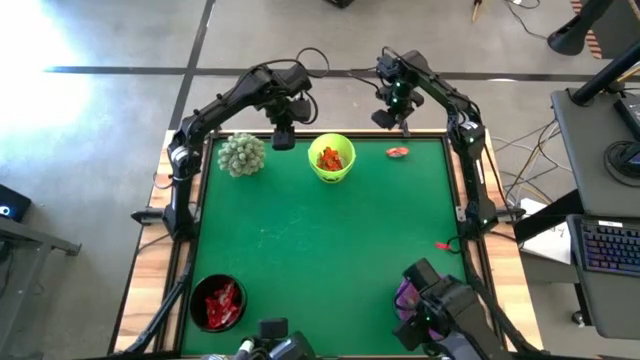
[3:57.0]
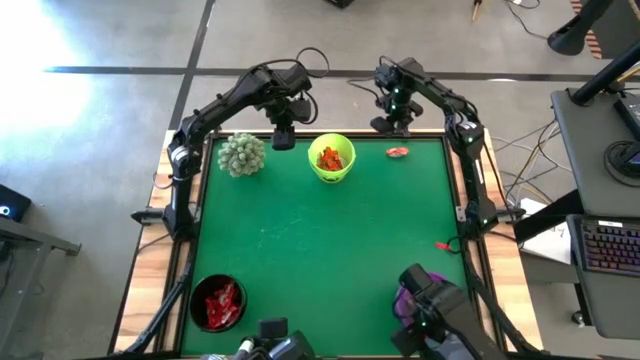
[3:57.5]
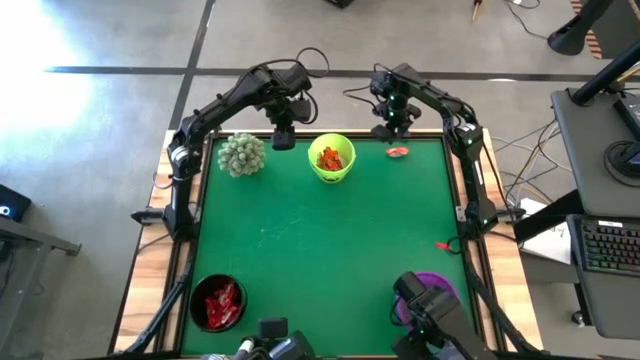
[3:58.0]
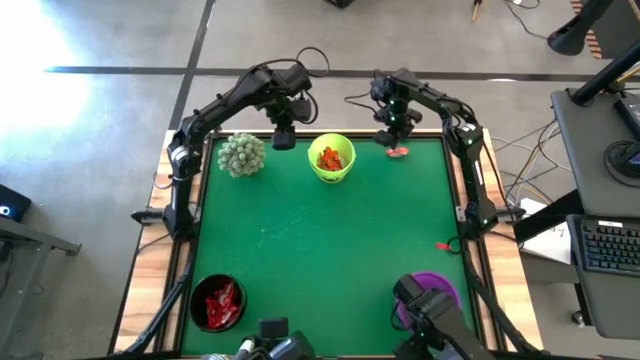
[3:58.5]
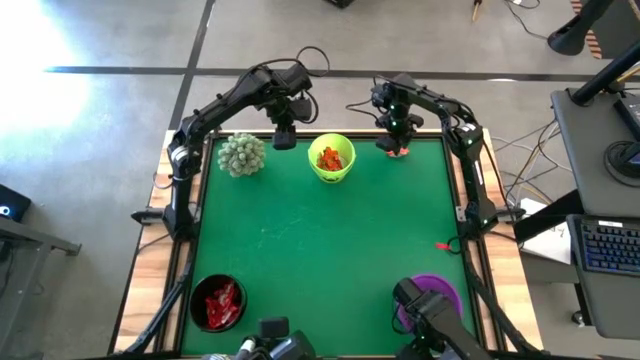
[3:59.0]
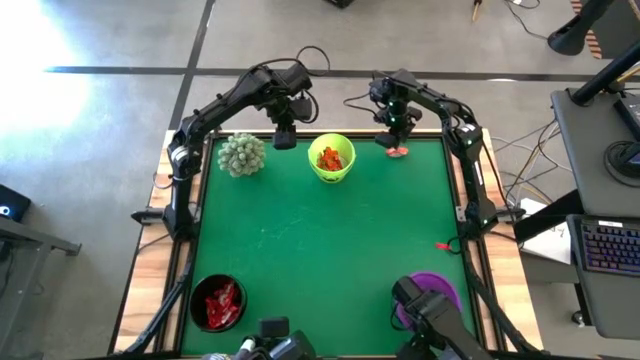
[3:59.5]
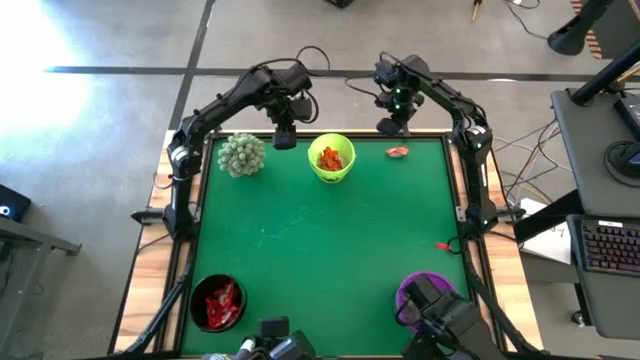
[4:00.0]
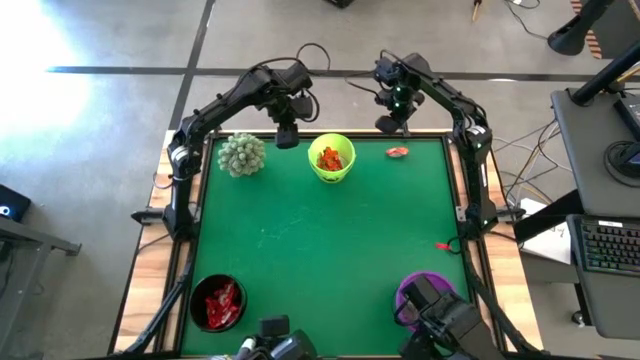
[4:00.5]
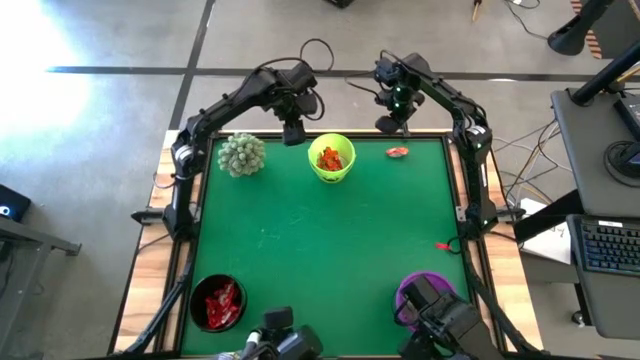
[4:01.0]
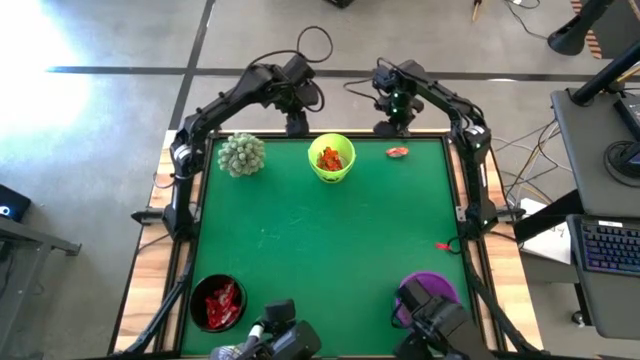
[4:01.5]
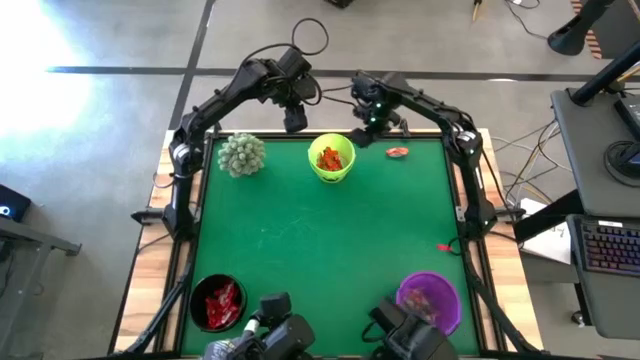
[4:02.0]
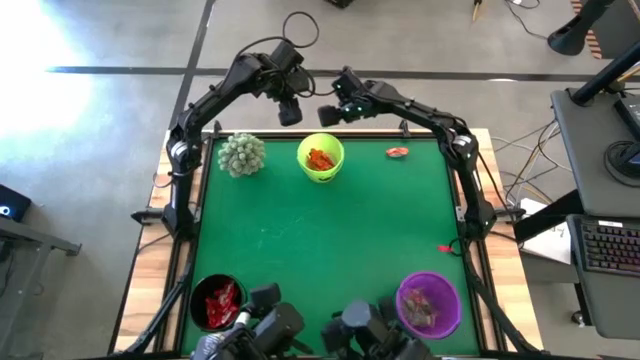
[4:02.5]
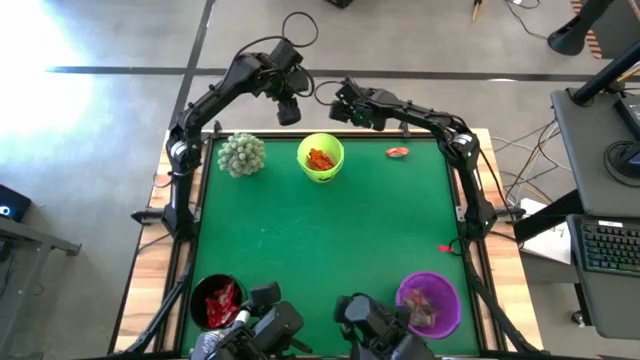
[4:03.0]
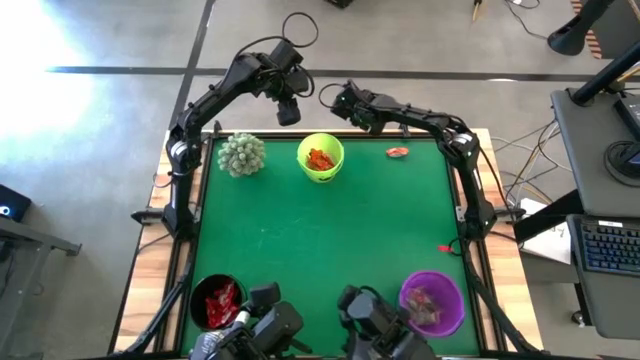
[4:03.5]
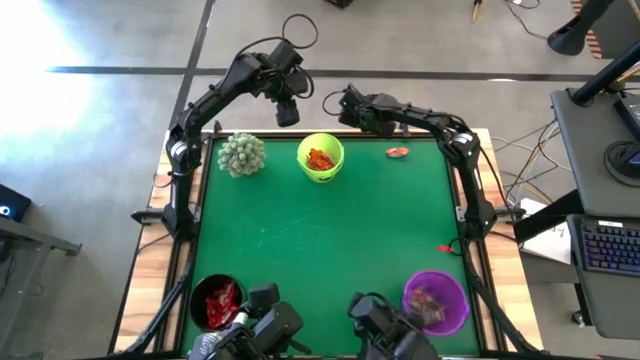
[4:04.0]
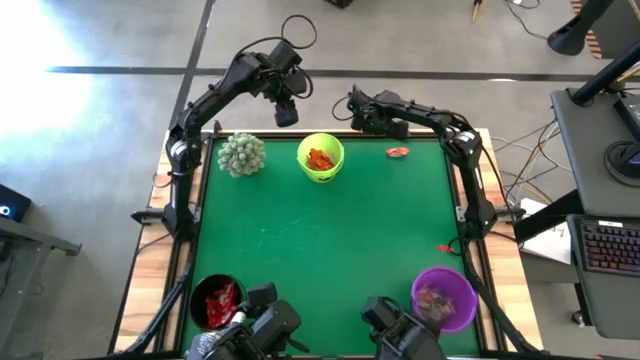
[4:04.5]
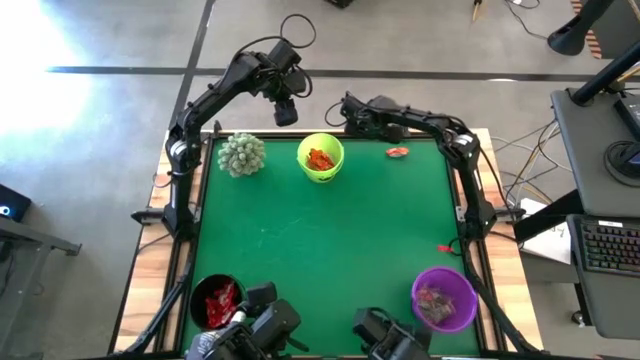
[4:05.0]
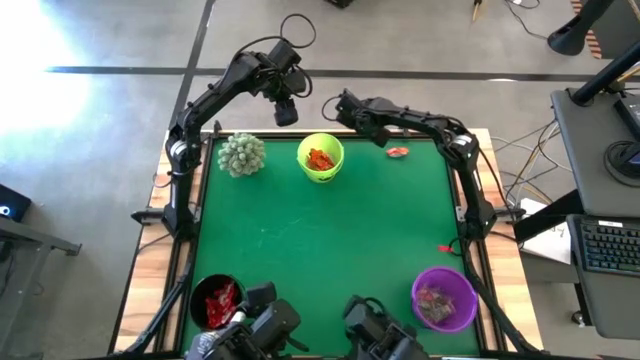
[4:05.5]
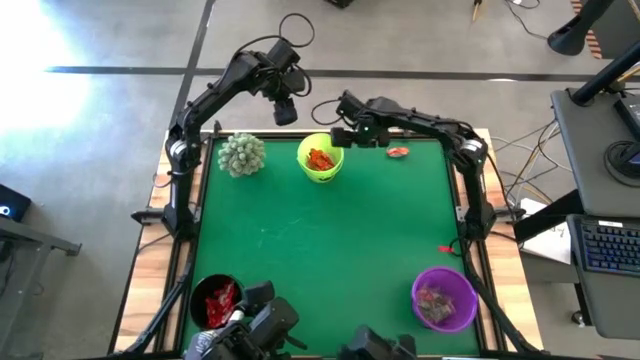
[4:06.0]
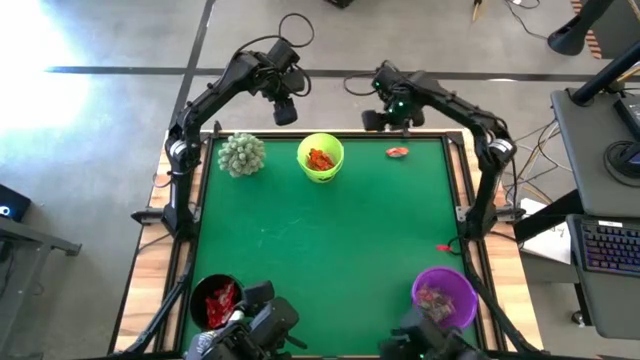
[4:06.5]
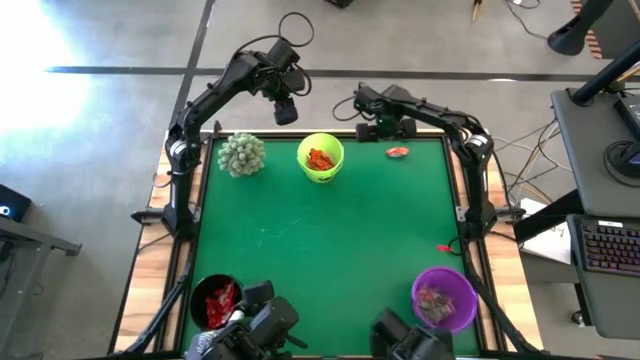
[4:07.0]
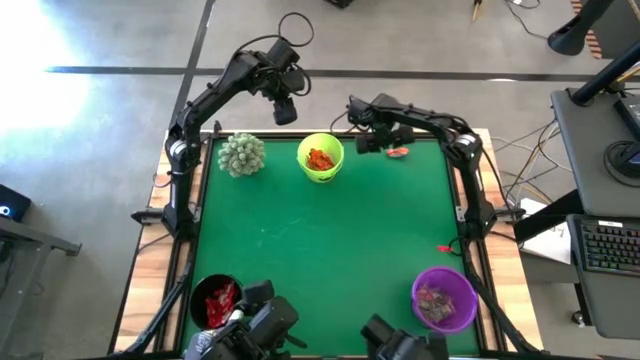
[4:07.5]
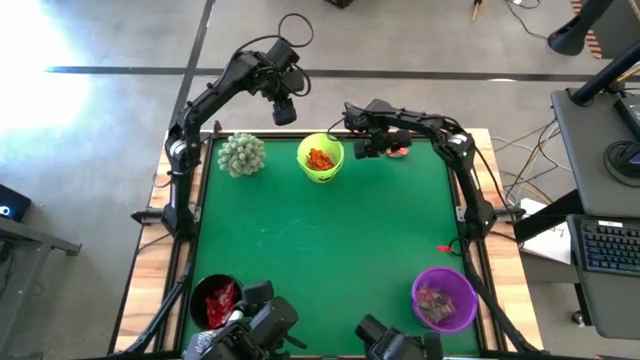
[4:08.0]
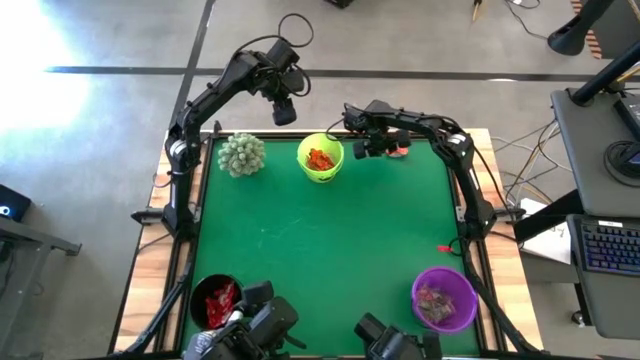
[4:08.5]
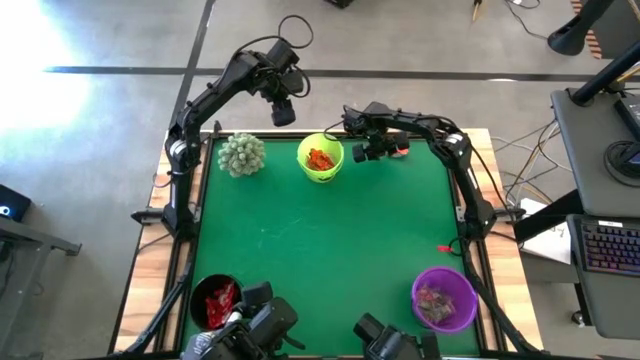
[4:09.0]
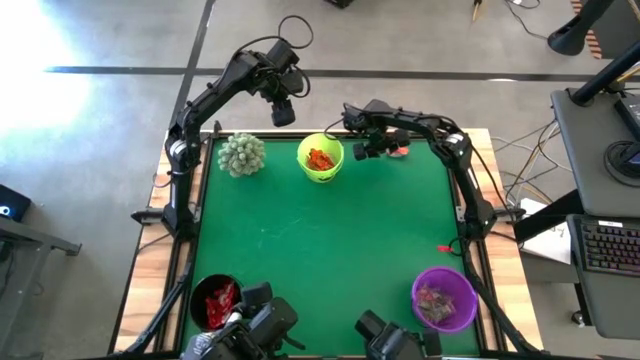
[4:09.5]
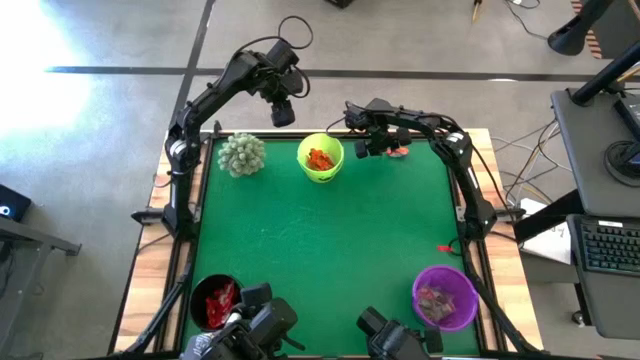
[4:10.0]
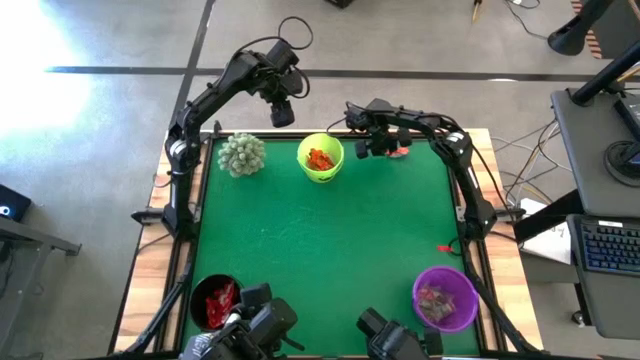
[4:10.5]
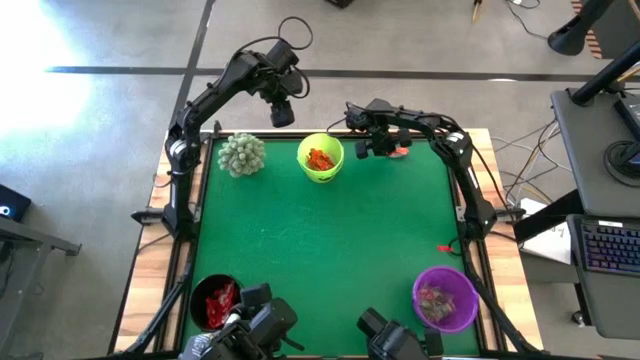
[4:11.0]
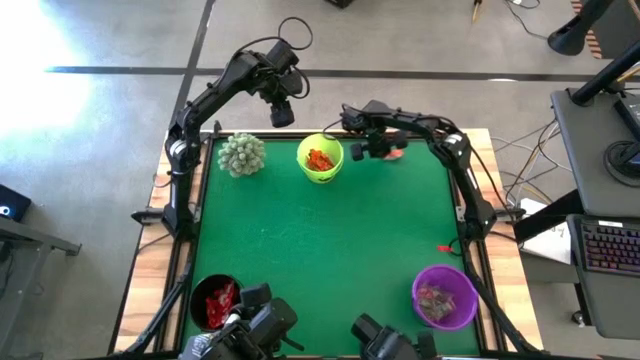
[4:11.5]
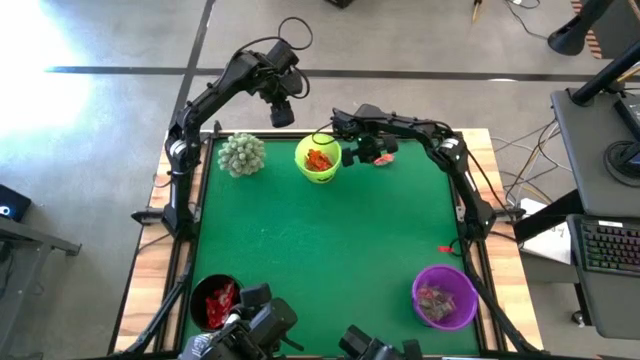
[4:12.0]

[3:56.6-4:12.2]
Task: Organize candy in baskets
Put the orange chocolate bar into the green bucket

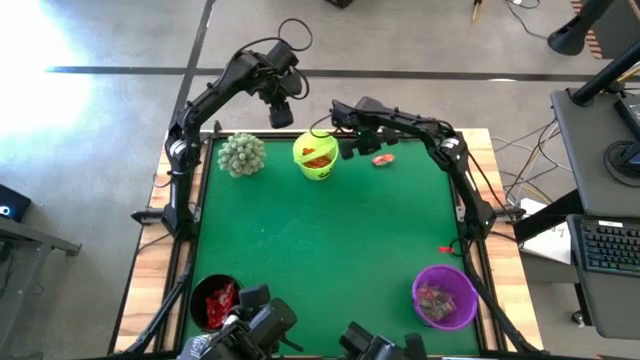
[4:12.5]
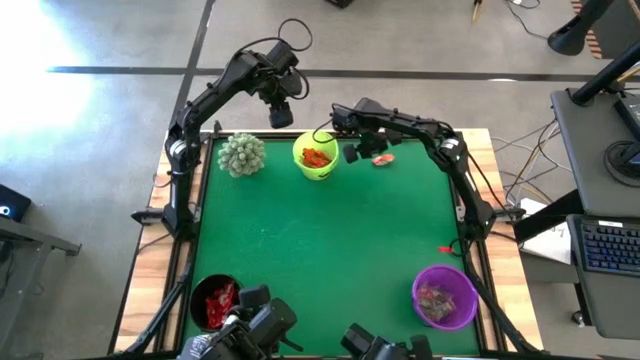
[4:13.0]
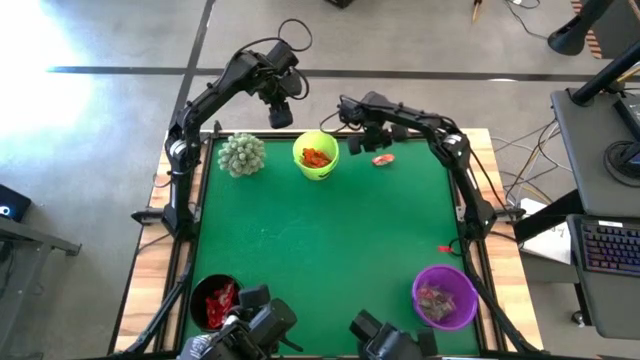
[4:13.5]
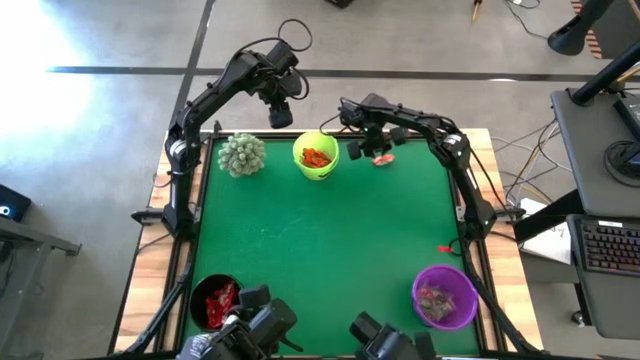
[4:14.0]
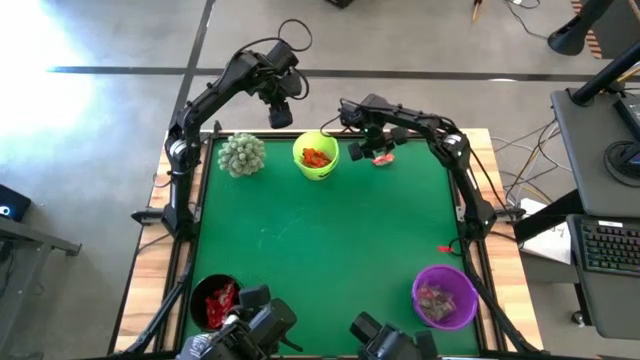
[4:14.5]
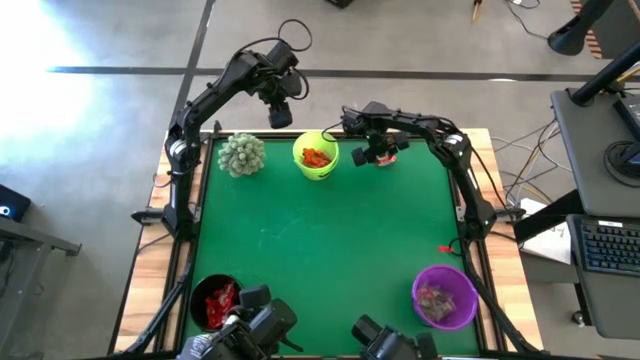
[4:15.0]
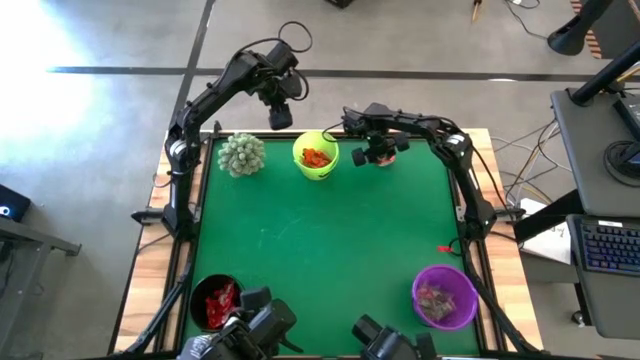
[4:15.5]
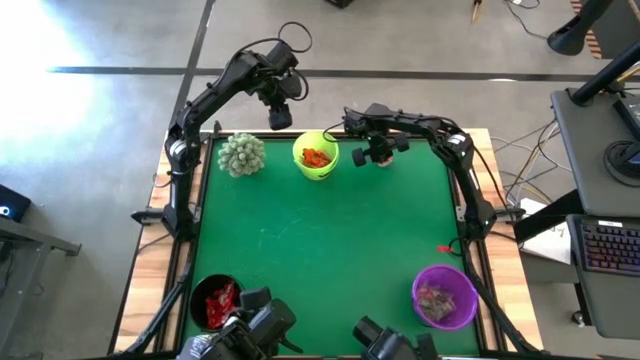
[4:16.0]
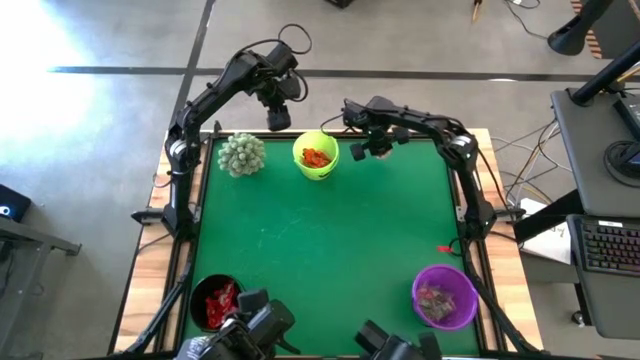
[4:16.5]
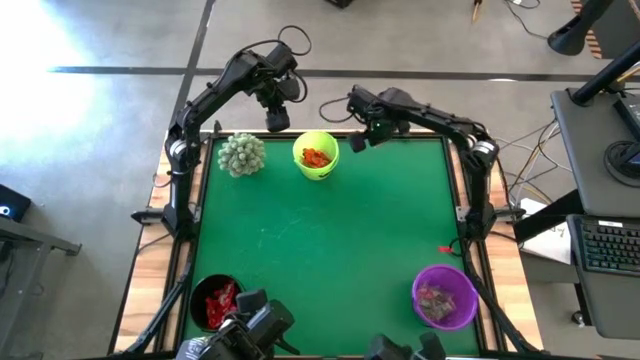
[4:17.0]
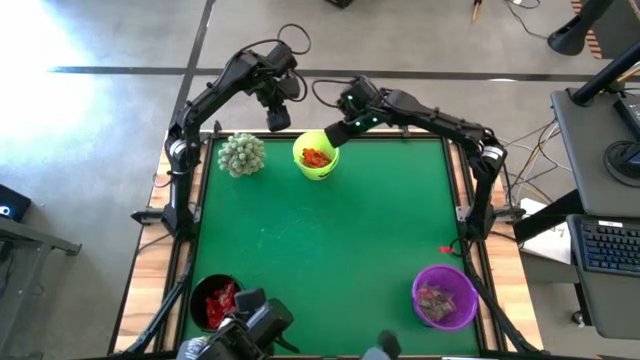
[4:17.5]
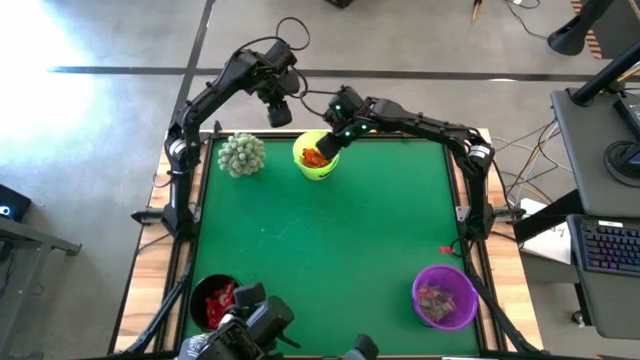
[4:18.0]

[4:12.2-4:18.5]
Put the orange chocolate bar into the green bucket
